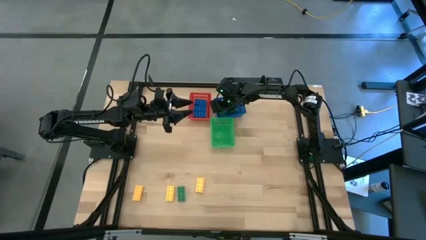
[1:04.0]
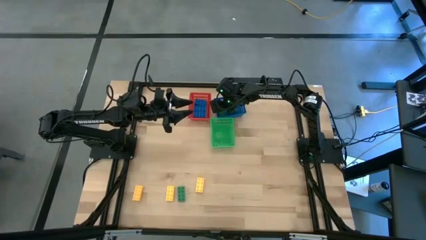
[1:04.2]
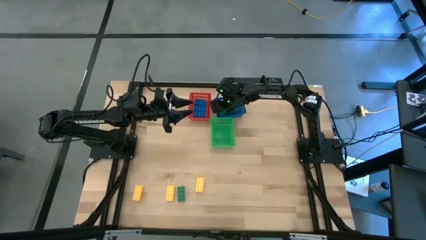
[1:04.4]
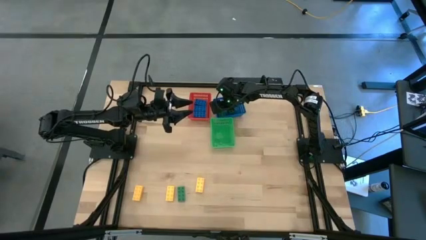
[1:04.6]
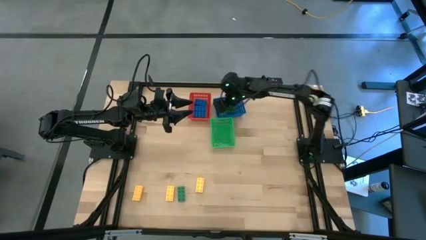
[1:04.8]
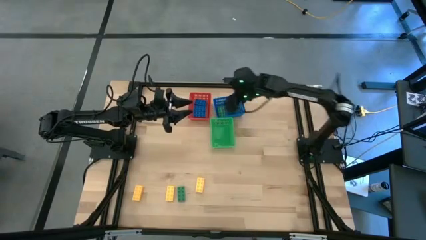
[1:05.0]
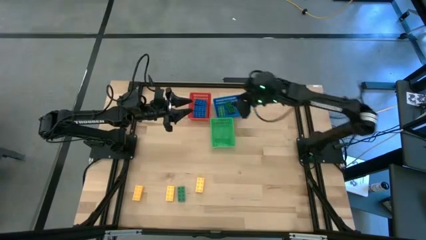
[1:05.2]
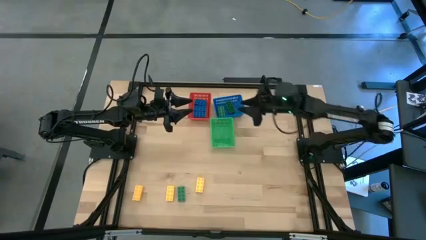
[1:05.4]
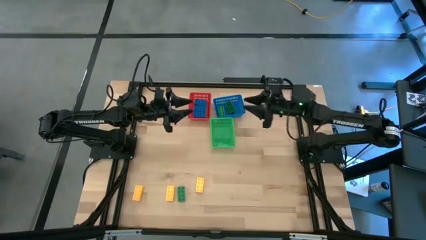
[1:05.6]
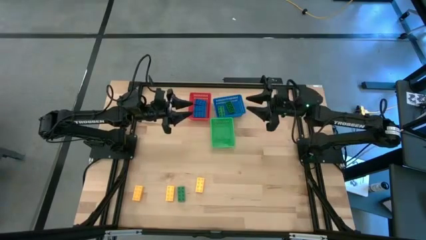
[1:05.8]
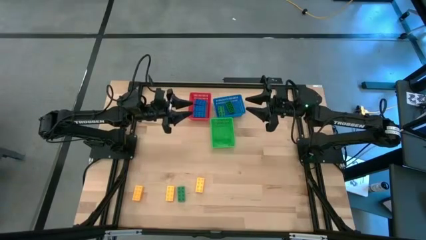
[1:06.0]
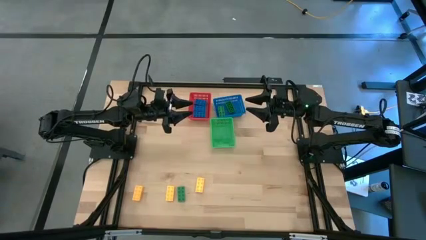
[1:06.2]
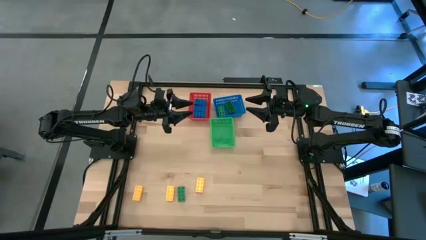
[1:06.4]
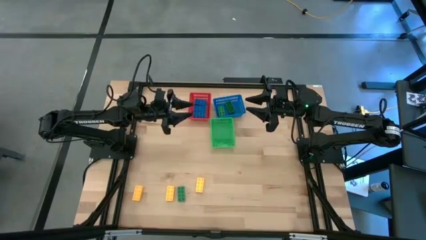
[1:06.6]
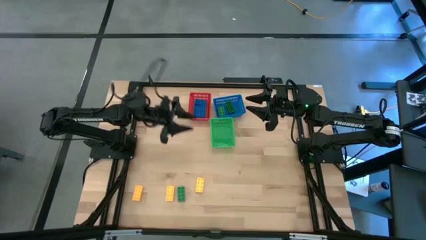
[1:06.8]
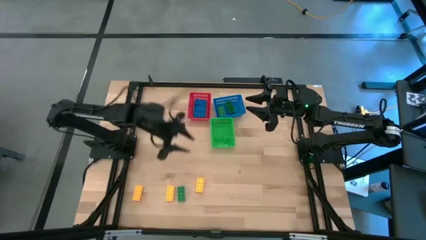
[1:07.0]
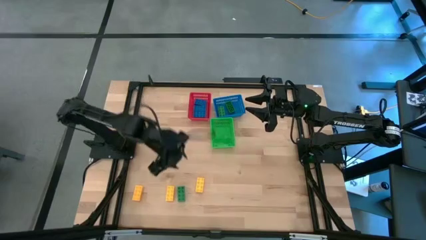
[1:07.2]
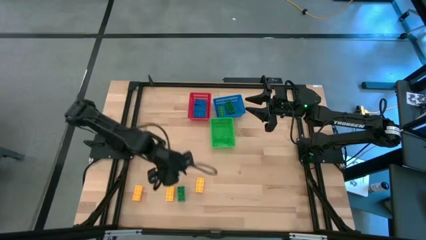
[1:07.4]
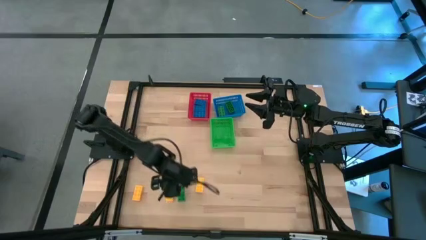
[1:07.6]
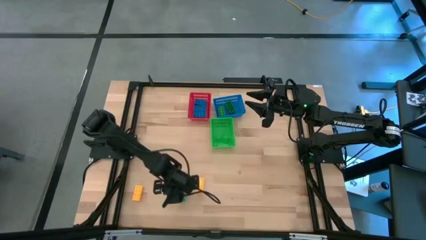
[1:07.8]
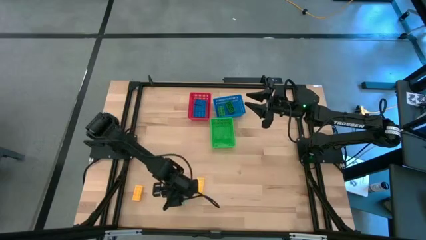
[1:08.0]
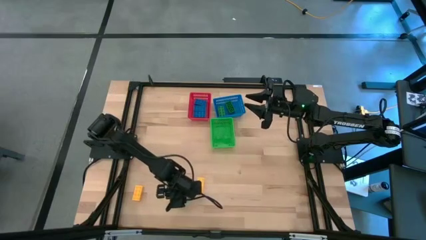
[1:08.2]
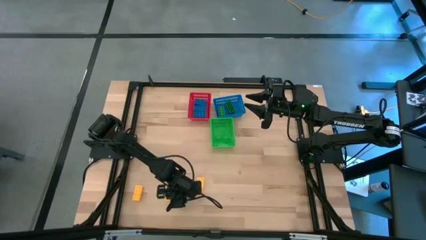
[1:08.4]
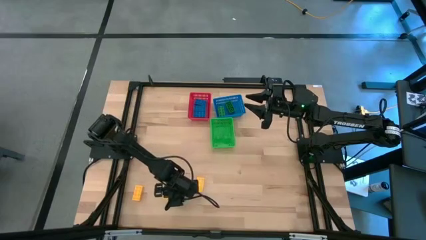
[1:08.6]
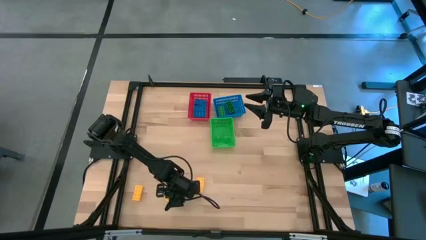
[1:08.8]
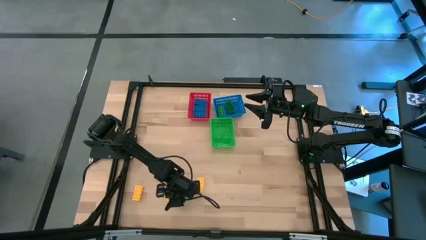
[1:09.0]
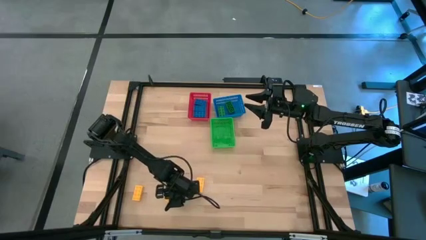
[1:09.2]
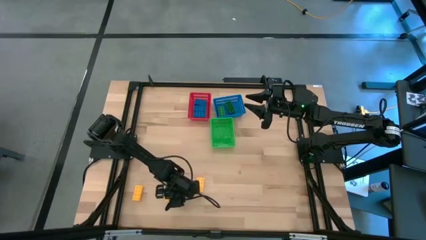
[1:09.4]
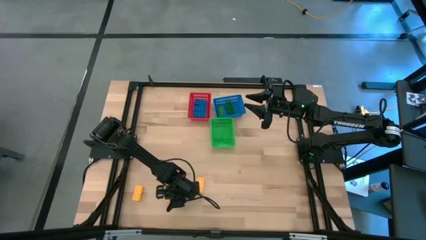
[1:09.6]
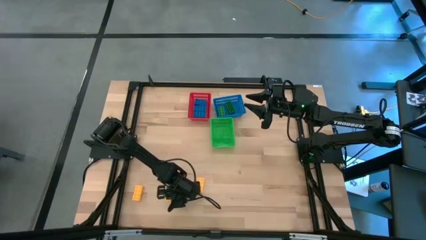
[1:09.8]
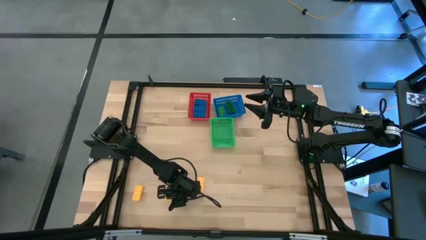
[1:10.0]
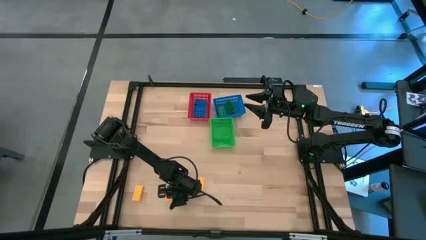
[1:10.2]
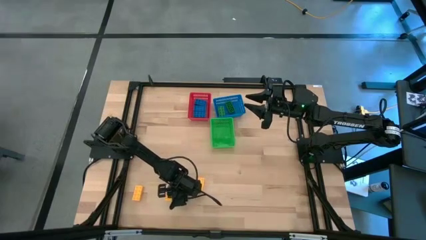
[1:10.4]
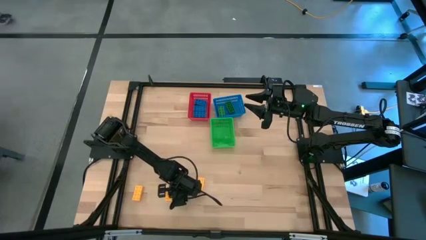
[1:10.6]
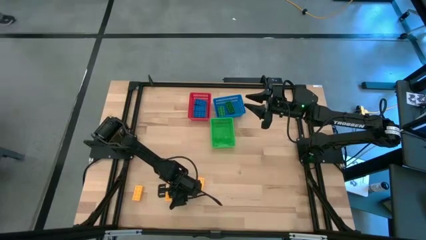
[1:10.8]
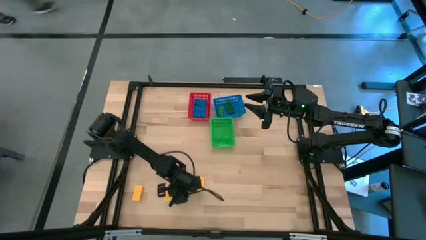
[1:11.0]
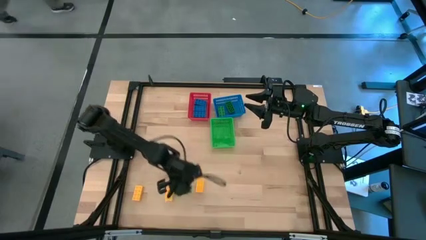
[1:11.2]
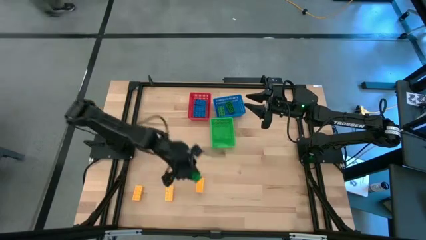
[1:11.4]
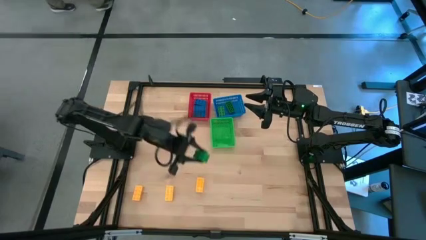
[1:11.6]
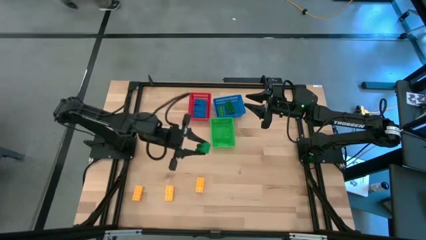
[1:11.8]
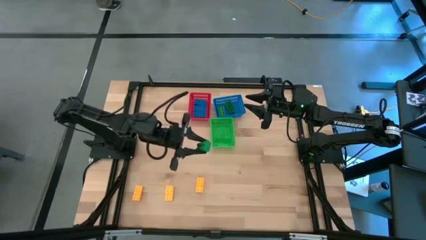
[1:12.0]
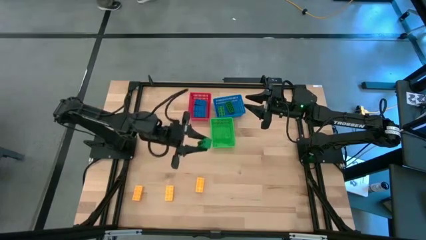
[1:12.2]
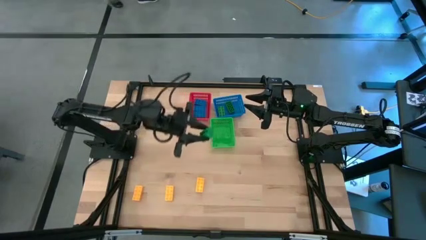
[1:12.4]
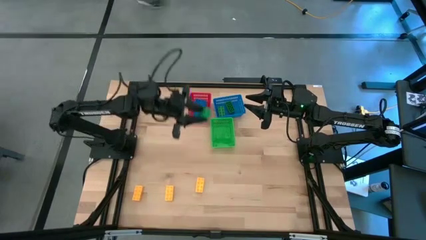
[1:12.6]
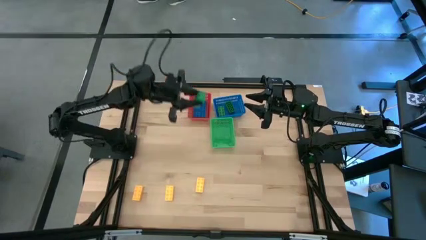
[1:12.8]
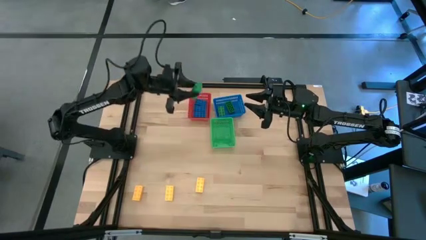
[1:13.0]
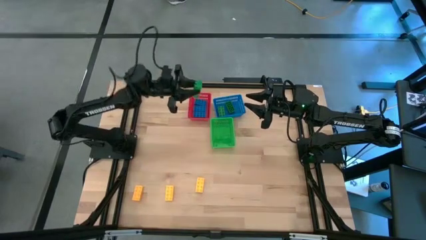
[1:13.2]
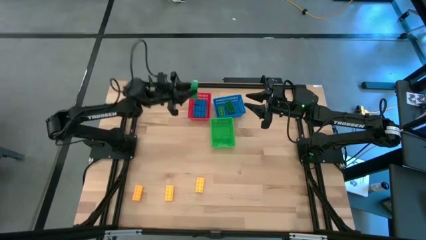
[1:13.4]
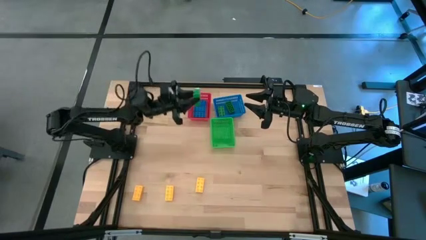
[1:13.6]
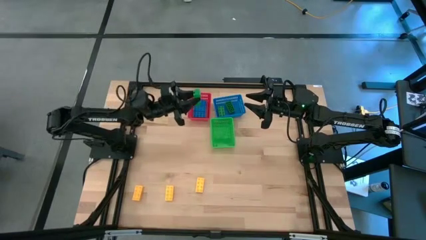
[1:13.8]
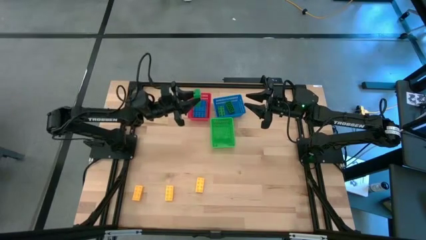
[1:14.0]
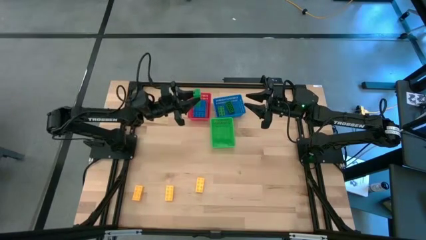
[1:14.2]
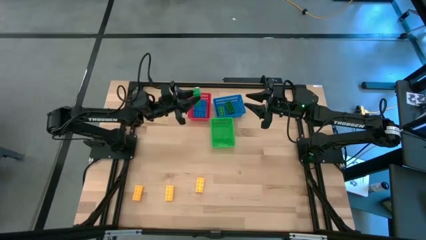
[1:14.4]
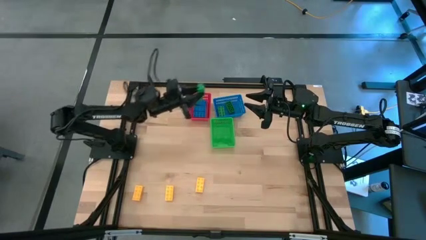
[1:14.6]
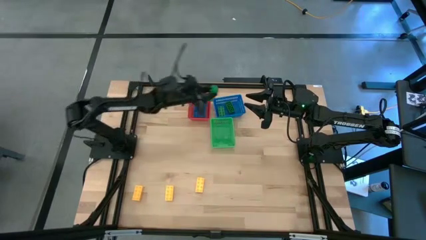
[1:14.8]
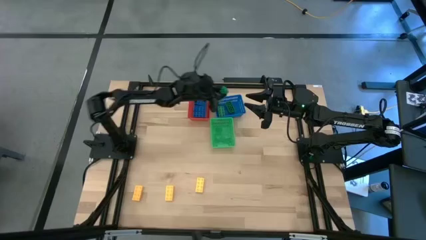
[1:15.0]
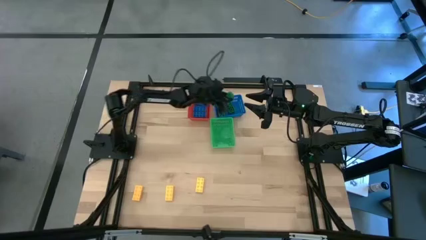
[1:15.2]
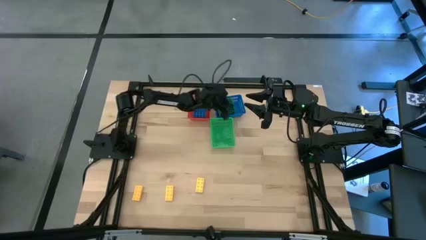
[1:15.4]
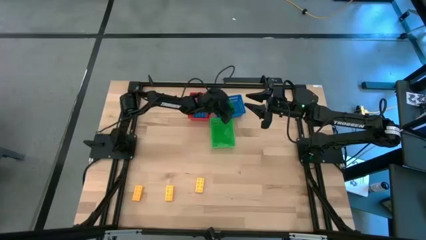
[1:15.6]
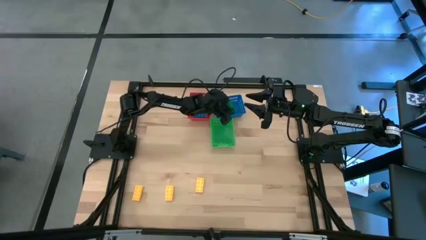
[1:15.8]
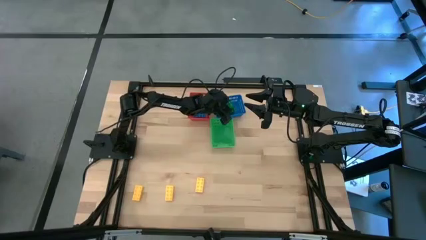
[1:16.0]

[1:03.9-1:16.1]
Task: Sort & place blocks by color
Put the green game piece into the blue bin

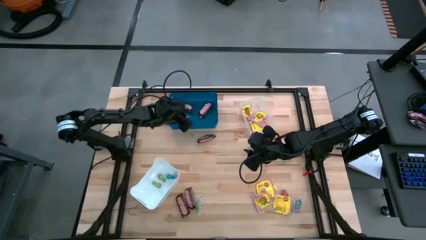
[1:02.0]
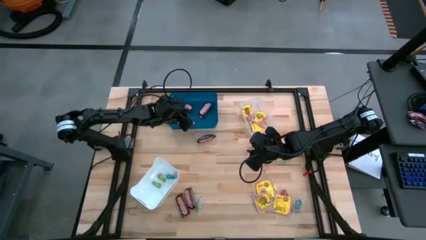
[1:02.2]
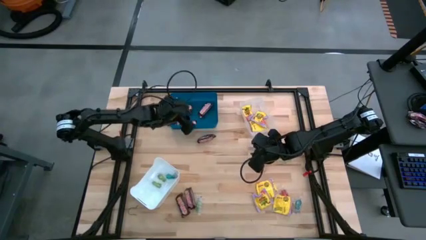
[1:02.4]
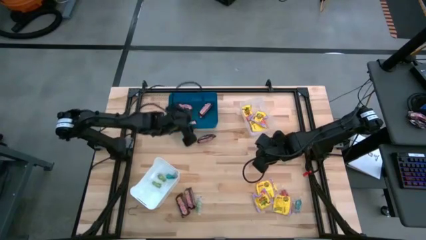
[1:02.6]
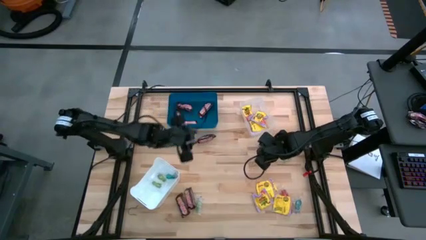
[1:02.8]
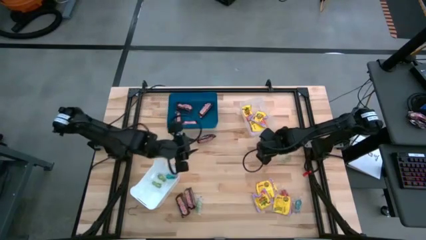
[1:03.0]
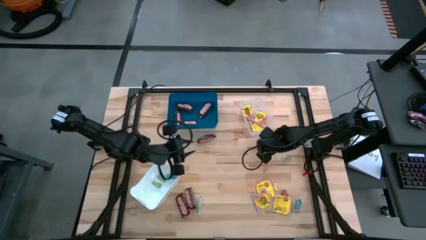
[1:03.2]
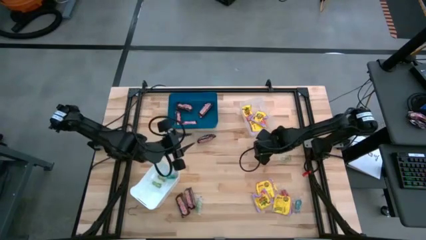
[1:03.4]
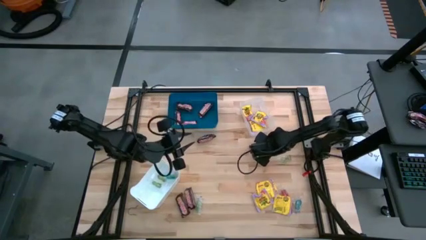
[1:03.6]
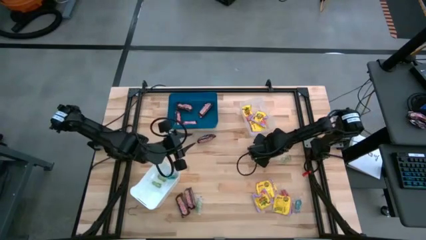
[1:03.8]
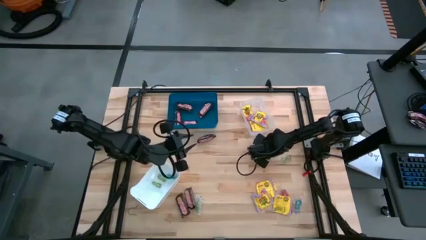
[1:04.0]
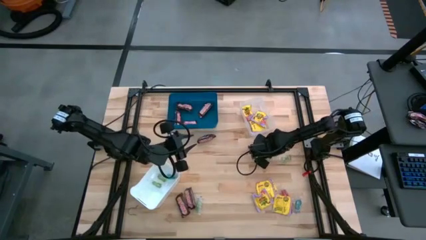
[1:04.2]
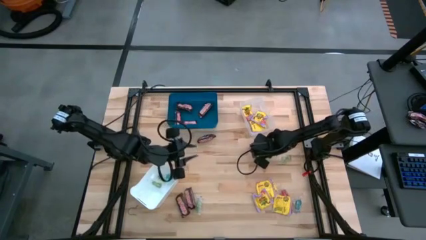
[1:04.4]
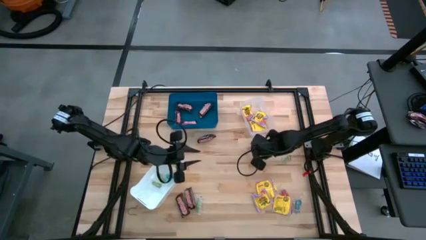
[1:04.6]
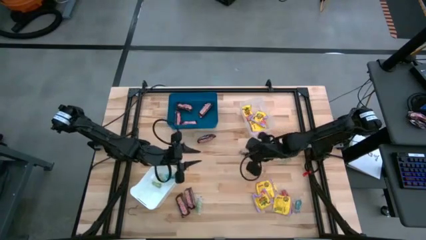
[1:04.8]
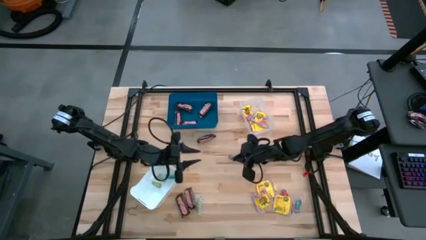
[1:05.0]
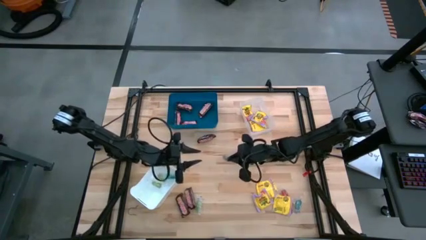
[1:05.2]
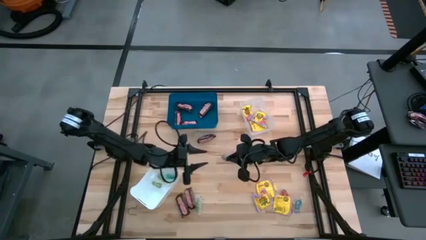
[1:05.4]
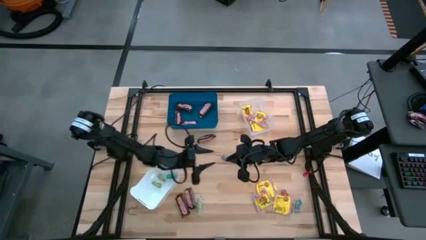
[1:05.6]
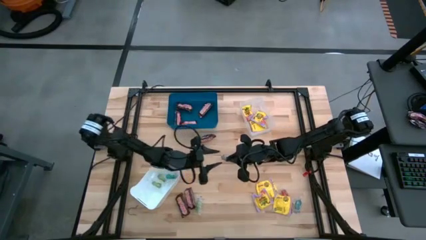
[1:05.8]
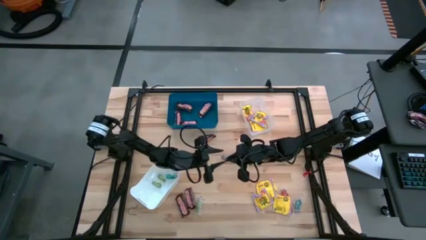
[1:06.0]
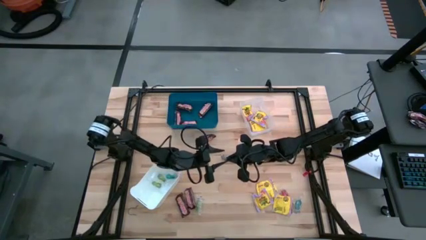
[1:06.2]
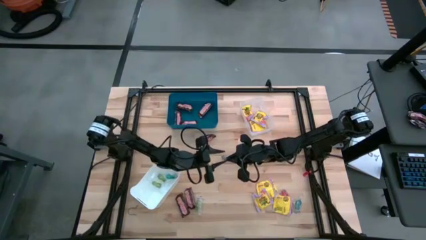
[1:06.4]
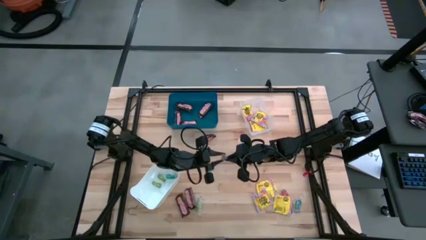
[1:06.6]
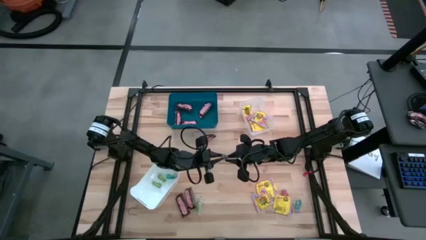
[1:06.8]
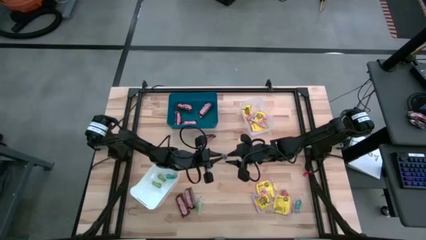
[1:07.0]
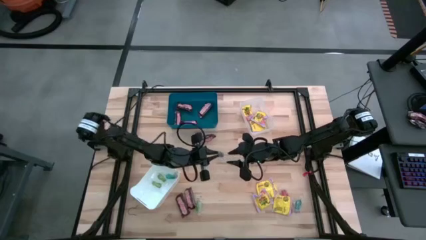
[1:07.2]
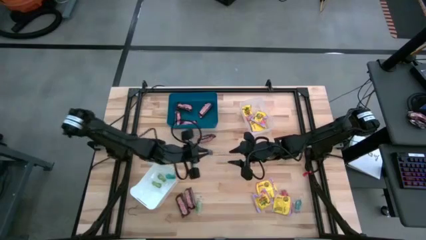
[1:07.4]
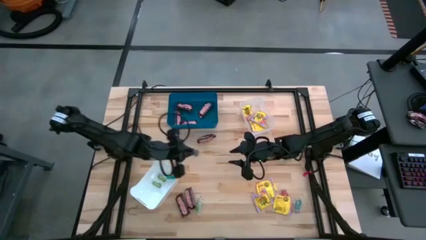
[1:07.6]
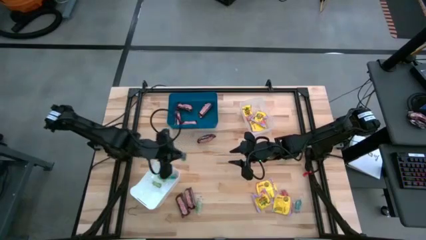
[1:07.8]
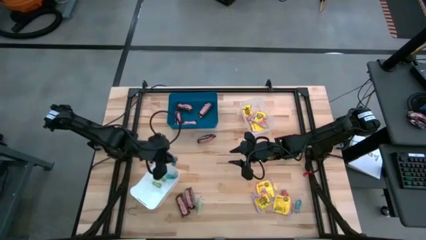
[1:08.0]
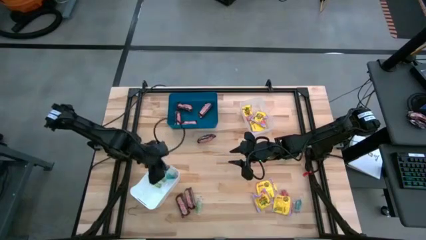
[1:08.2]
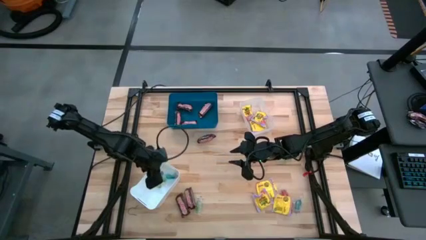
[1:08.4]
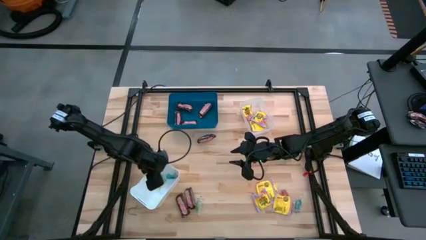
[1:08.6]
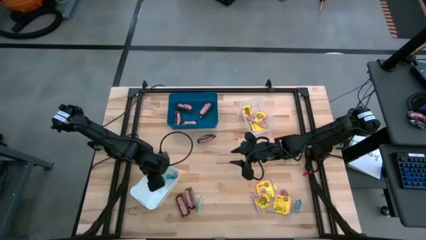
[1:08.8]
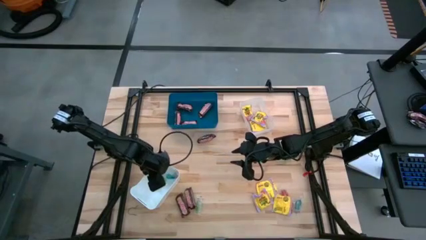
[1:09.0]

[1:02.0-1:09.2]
Task: Sort candy
Put the blue gummy into the white bin
